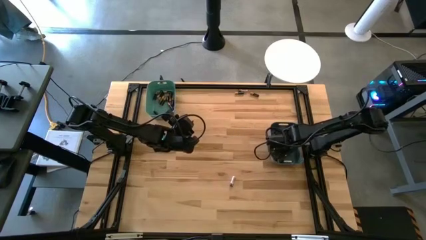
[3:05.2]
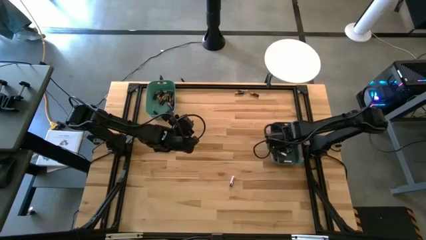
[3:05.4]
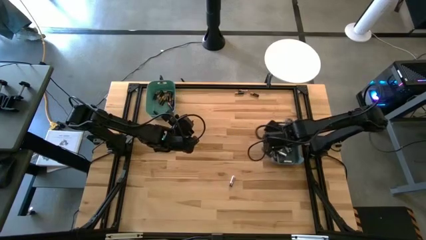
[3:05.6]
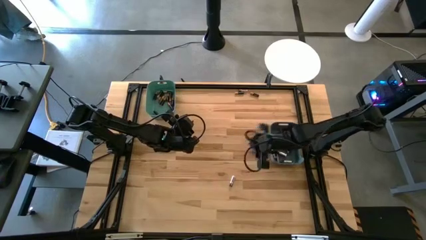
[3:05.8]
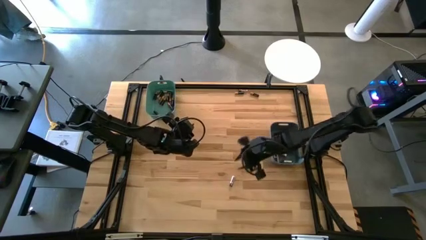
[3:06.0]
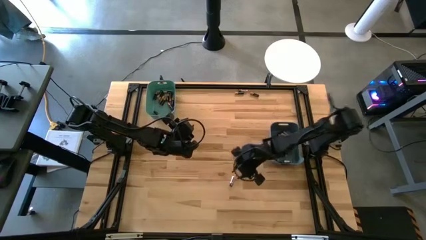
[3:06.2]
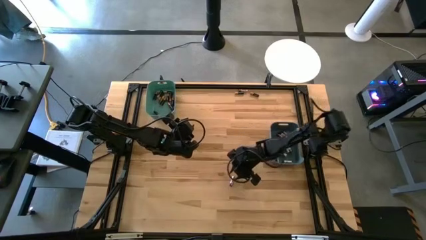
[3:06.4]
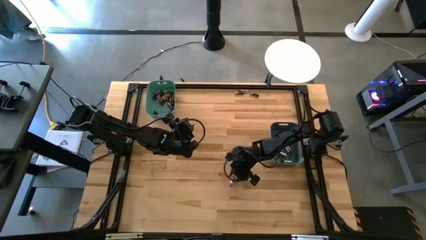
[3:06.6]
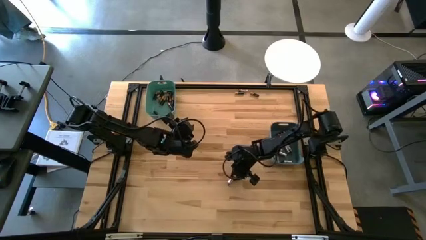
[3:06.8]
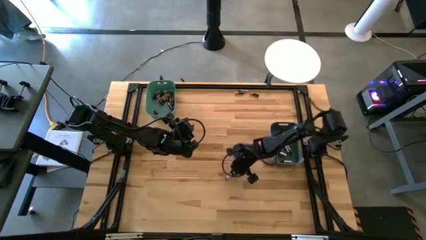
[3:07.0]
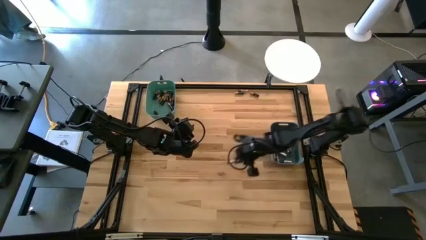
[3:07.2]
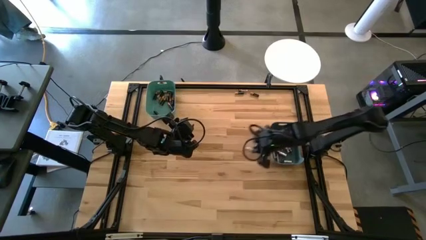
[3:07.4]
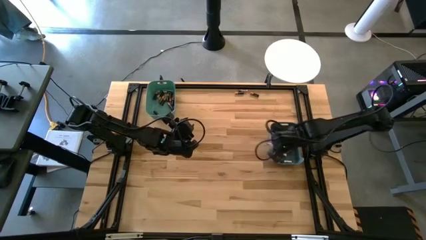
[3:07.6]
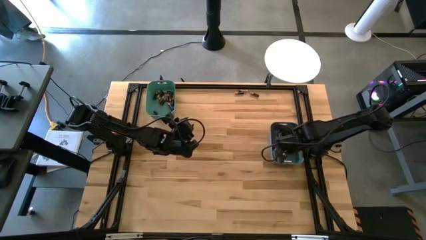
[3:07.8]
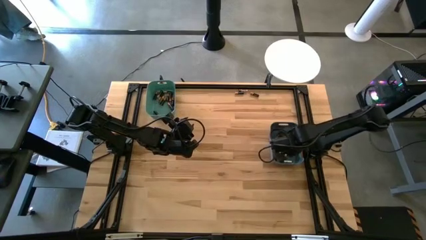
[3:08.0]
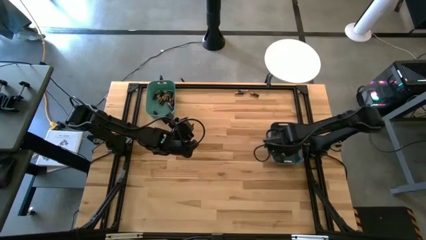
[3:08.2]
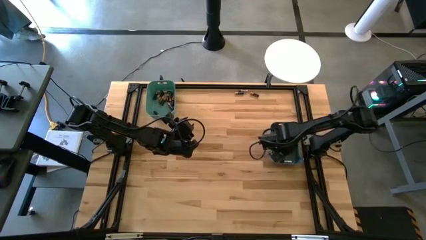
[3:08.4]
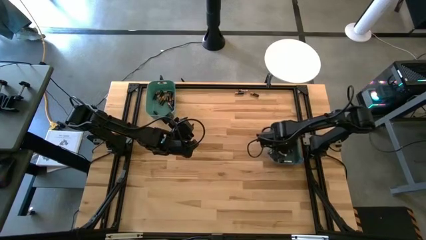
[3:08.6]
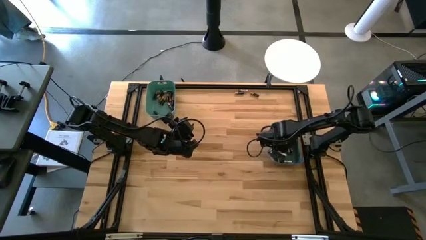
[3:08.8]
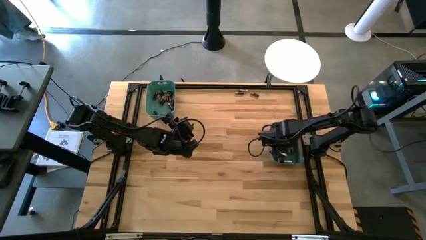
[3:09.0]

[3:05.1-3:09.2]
Task: Sort batteries
Put the silver battery into the blue bin

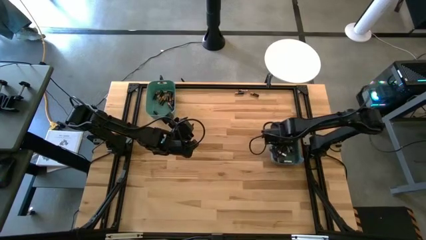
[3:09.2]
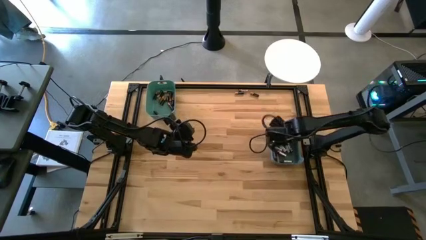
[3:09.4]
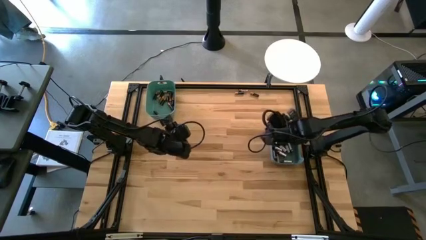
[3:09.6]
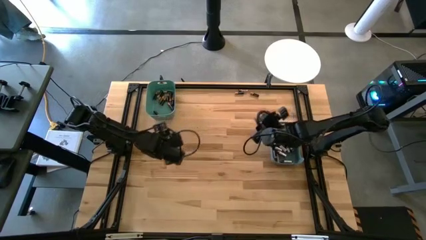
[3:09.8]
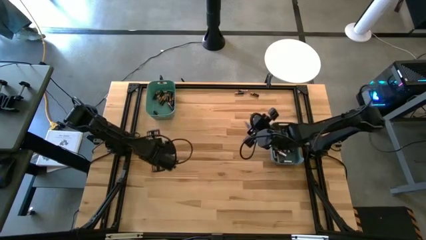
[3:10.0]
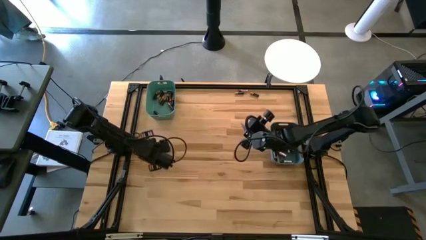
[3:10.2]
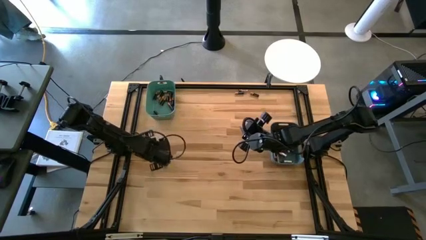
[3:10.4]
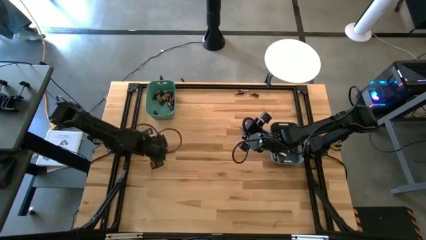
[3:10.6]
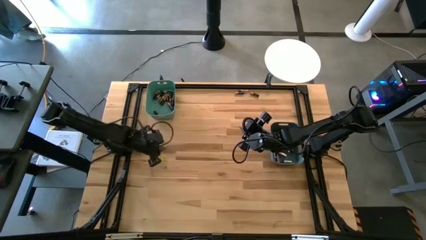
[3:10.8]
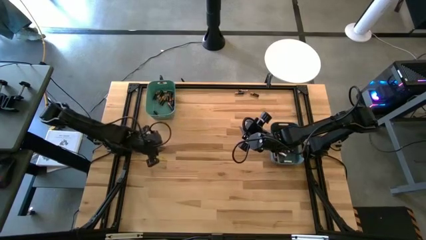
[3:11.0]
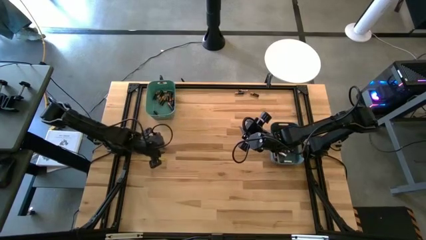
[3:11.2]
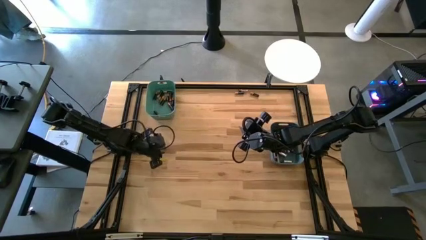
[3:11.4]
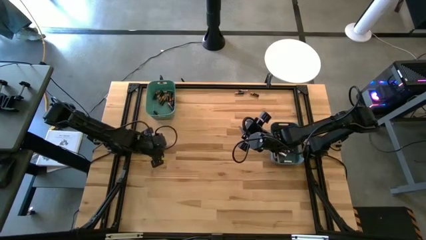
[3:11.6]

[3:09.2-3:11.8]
Put the silver battery into the blue bin

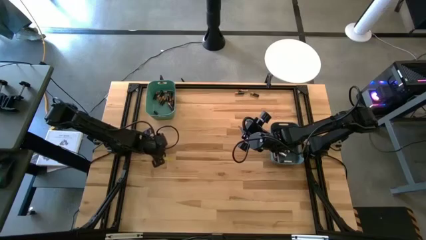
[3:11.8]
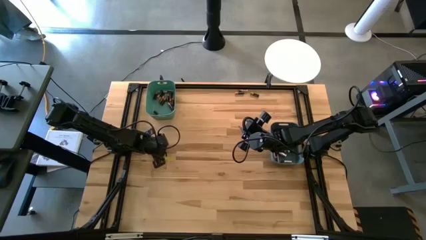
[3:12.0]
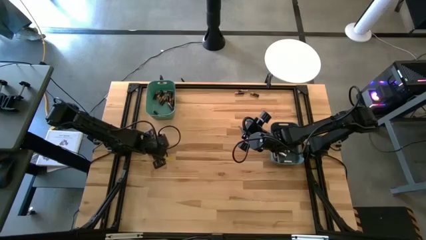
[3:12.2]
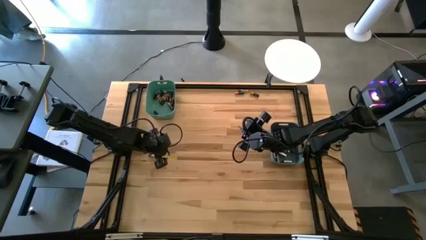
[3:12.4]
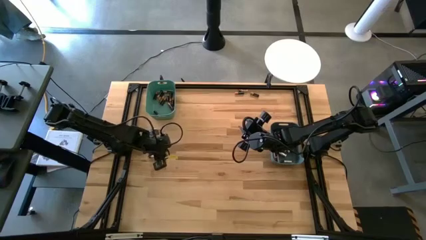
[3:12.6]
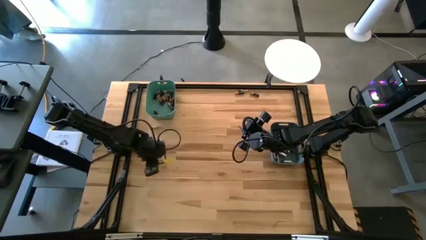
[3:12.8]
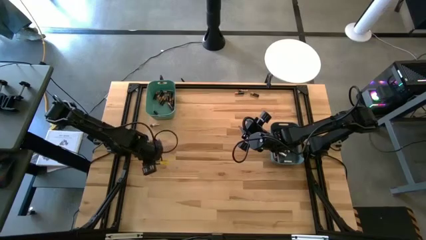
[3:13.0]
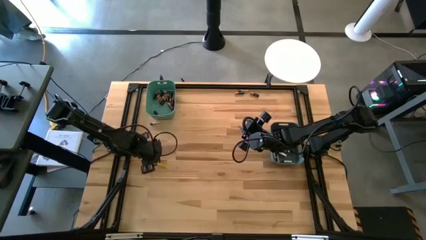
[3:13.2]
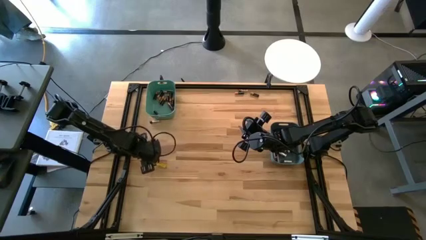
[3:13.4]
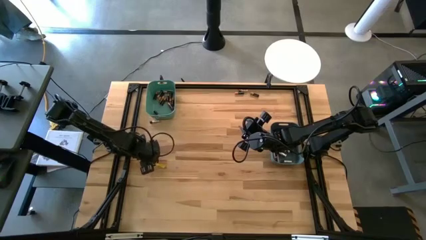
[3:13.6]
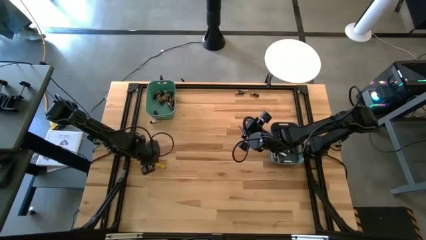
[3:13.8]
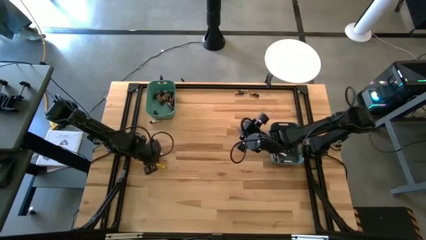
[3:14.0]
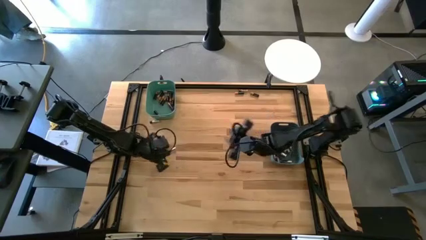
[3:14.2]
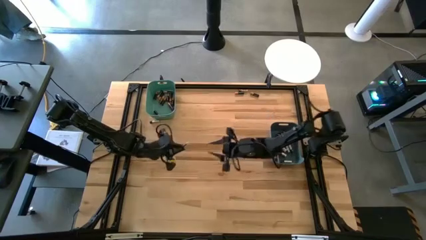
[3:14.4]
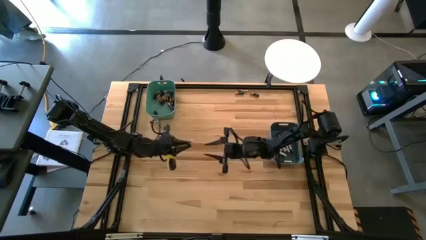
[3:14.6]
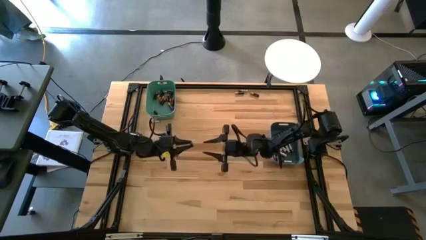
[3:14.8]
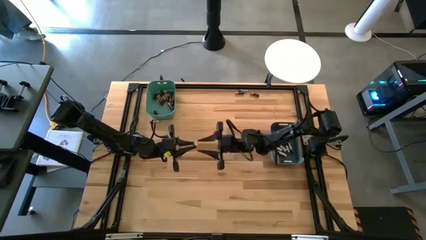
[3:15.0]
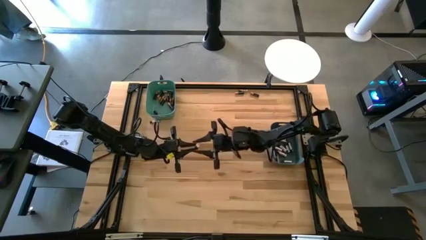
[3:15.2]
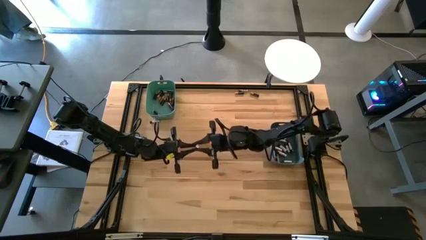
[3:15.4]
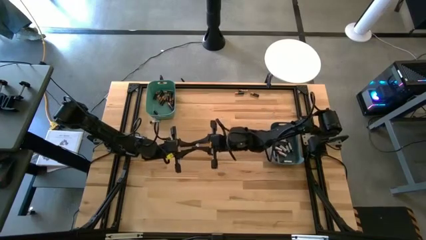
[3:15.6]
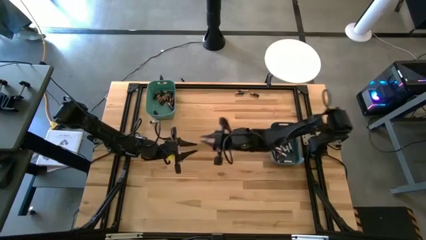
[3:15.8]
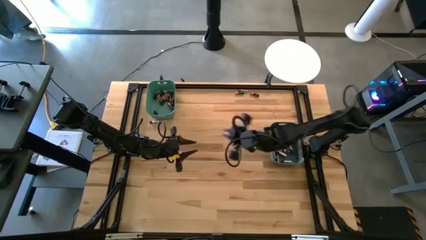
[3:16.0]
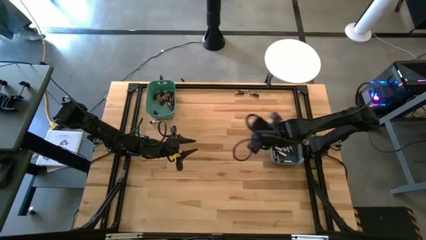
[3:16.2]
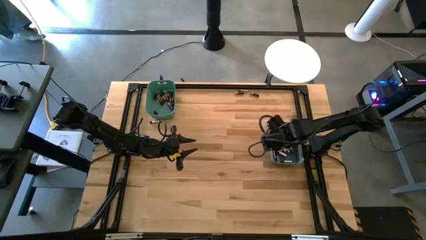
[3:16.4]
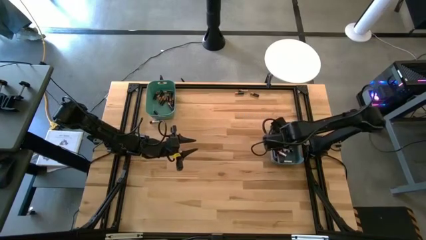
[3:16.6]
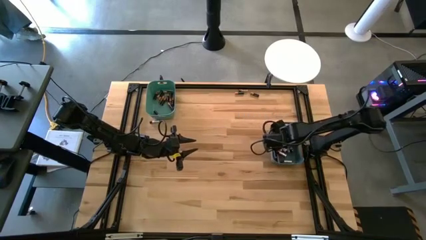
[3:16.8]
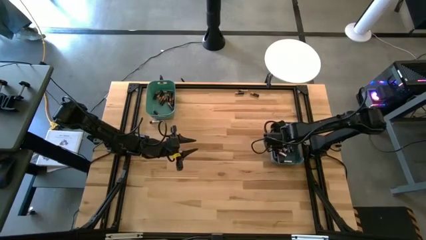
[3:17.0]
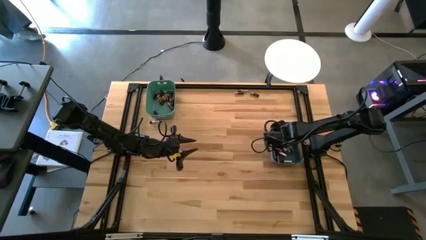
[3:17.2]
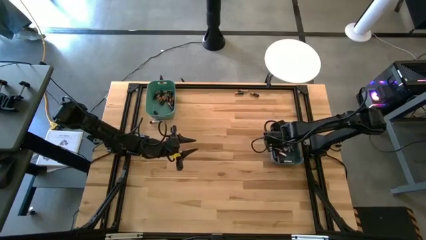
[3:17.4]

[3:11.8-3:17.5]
Put the silver battery into the blue bin

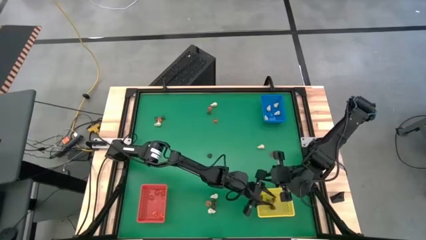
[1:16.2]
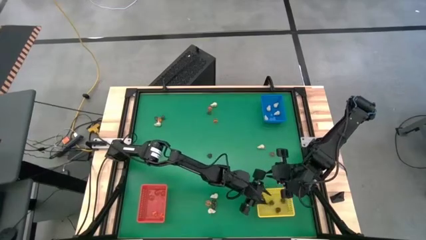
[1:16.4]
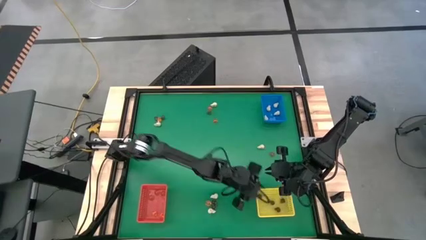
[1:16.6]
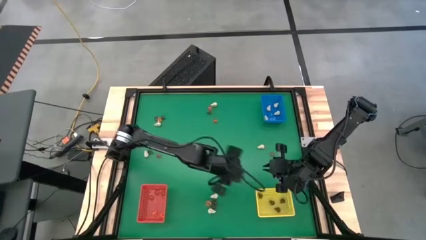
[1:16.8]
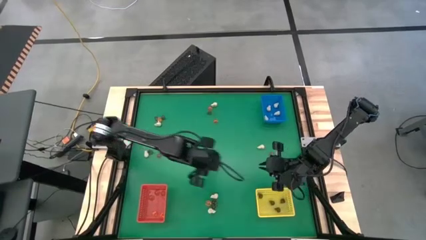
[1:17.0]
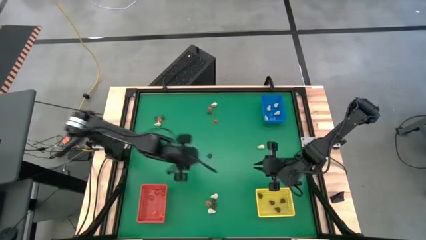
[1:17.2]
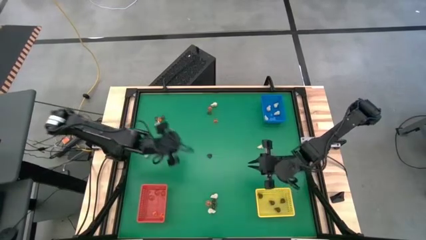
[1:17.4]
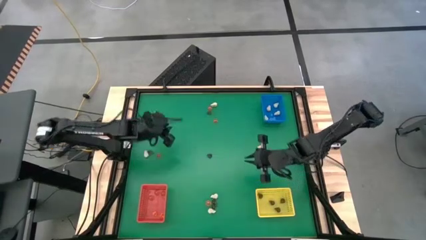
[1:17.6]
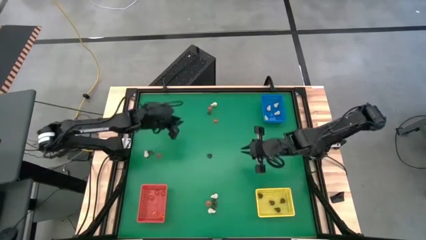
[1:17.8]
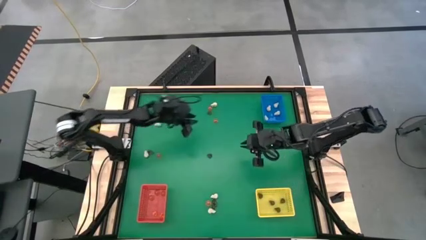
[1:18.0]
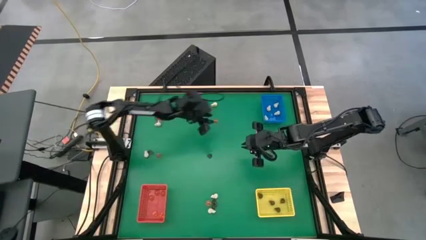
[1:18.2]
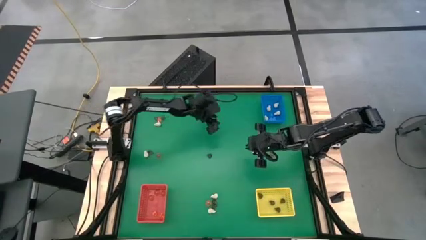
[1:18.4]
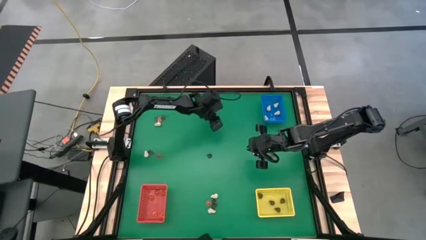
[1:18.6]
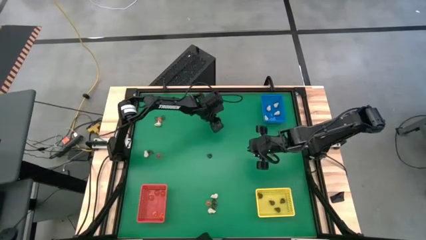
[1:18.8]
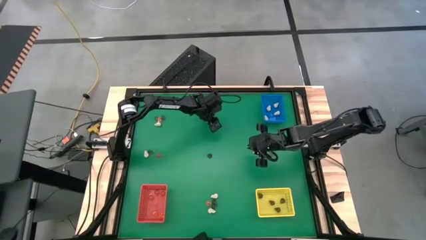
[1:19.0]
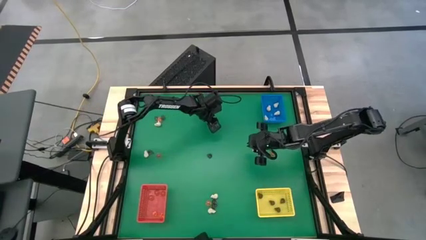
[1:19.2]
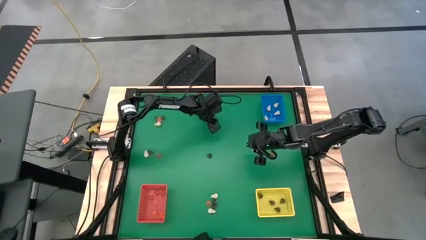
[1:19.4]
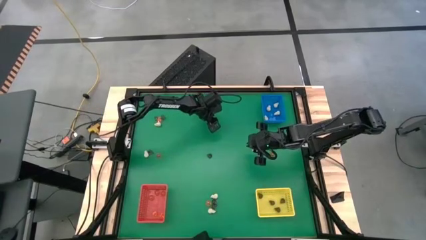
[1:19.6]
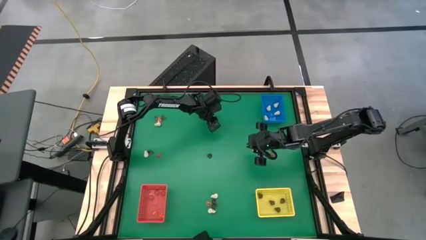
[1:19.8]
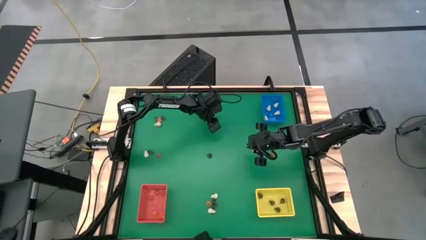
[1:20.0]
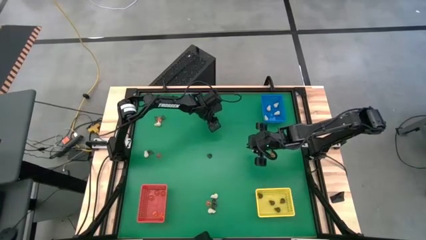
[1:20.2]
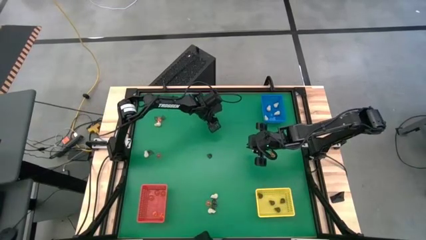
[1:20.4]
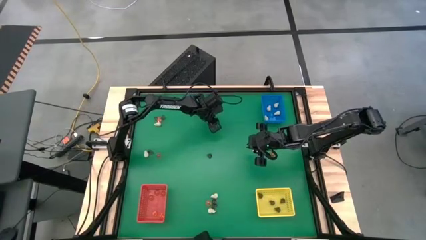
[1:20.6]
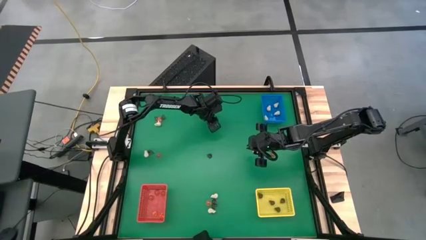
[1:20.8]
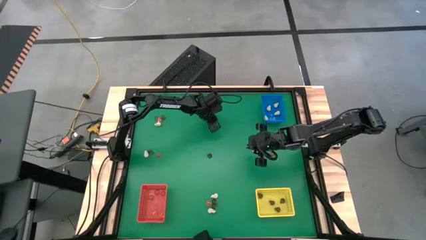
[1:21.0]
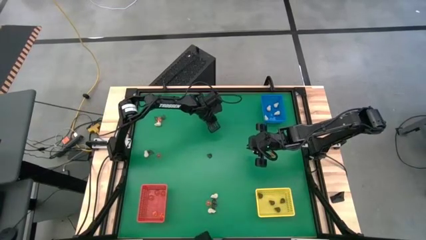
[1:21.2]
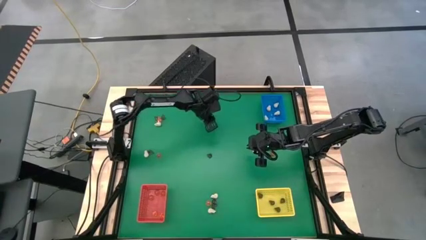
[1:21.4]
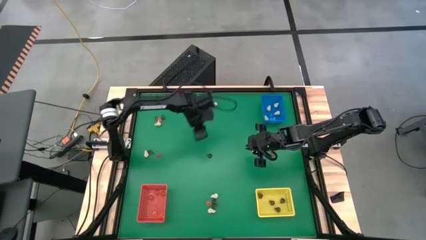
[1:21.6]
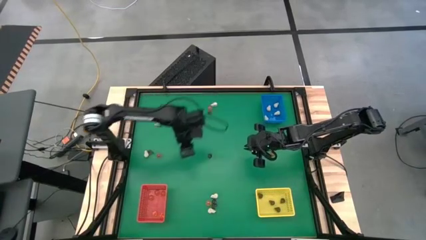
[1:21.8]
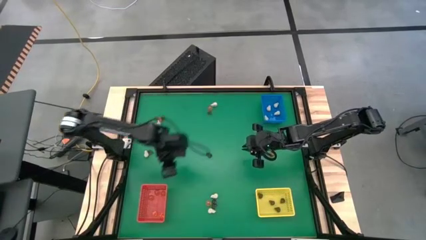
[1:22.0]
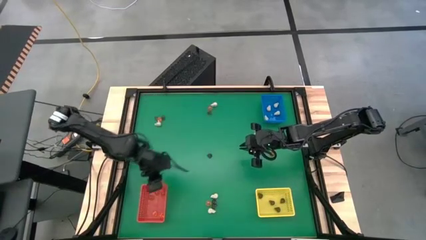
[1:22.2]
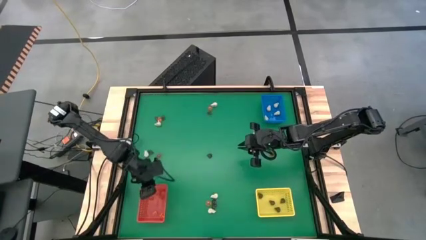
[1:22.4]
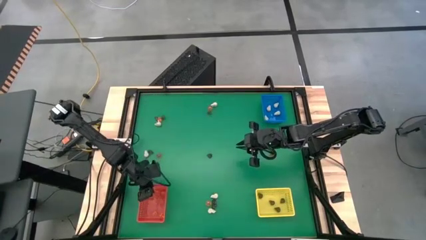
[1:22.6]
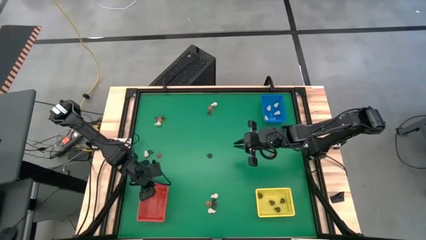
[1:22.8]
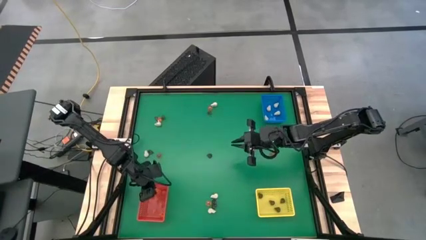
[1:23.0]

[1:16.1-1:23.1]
Task: Sort Halloween decoration
Put the orange pumpkin toy into the red bin
